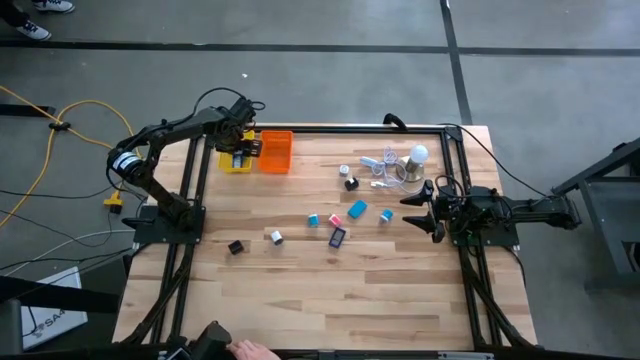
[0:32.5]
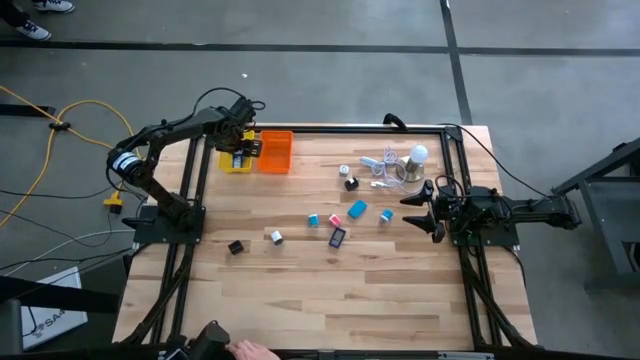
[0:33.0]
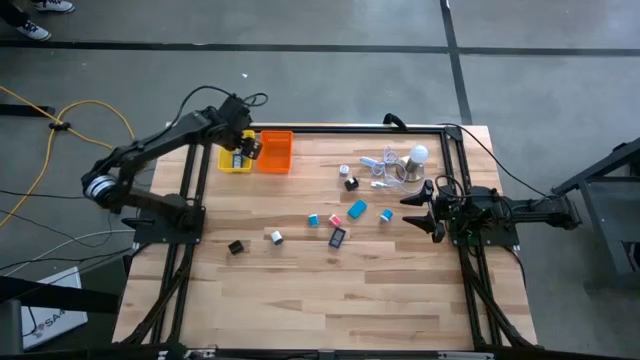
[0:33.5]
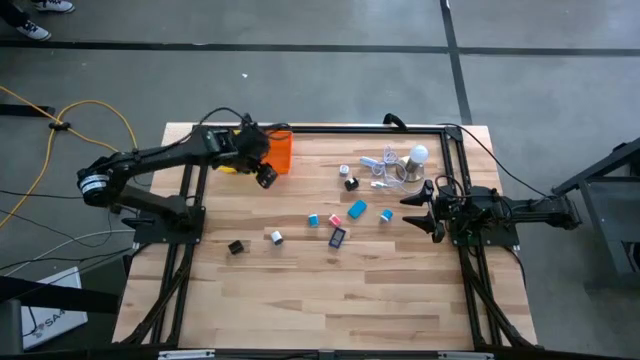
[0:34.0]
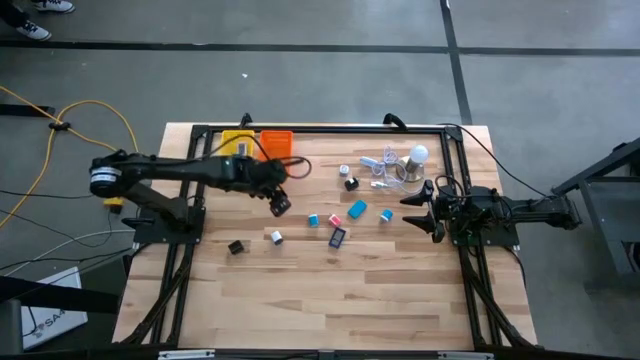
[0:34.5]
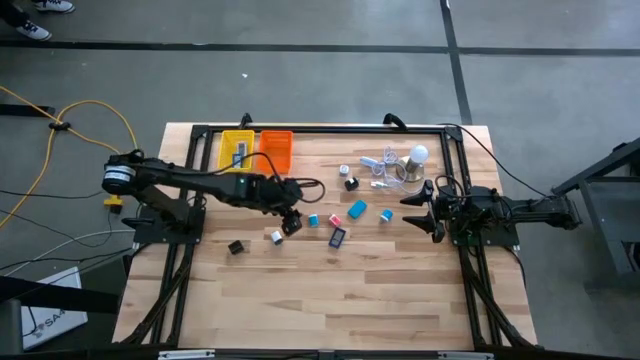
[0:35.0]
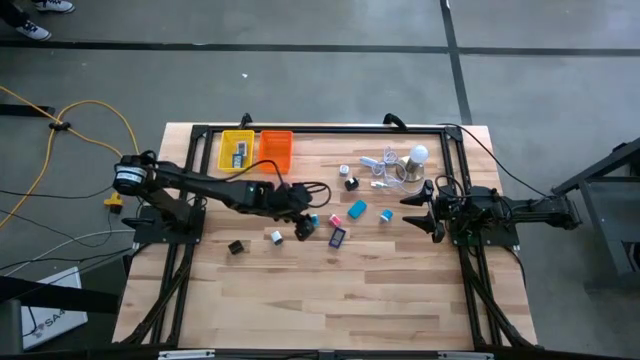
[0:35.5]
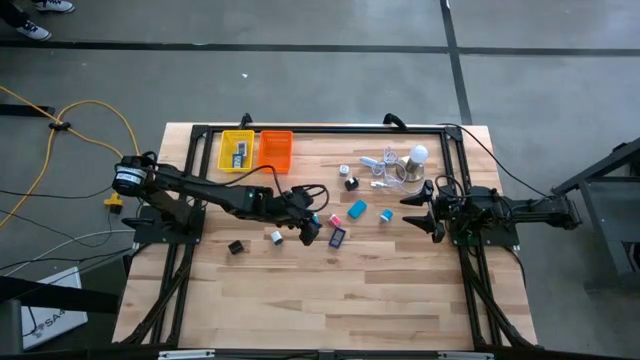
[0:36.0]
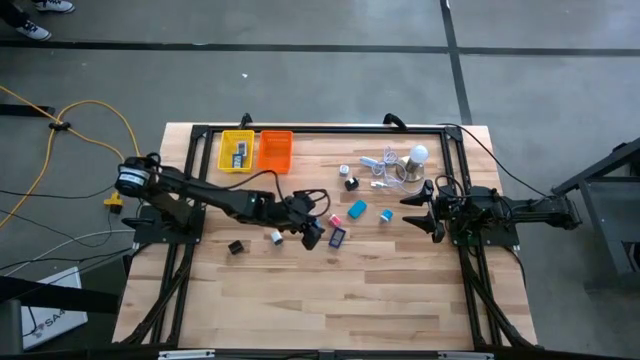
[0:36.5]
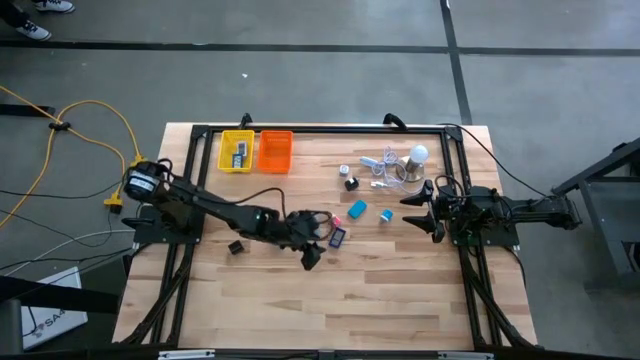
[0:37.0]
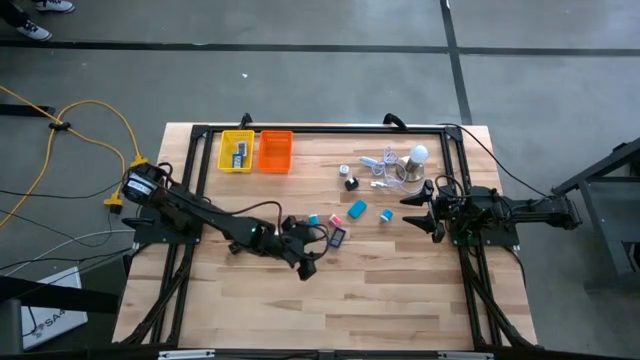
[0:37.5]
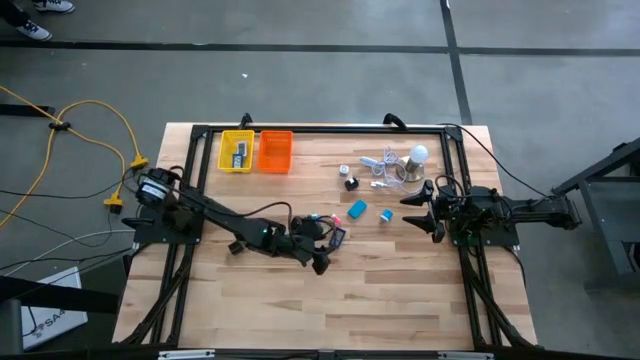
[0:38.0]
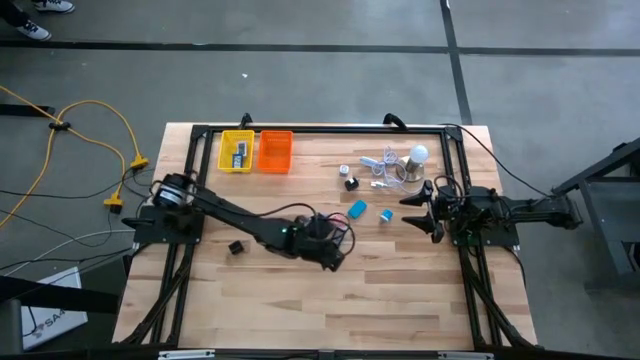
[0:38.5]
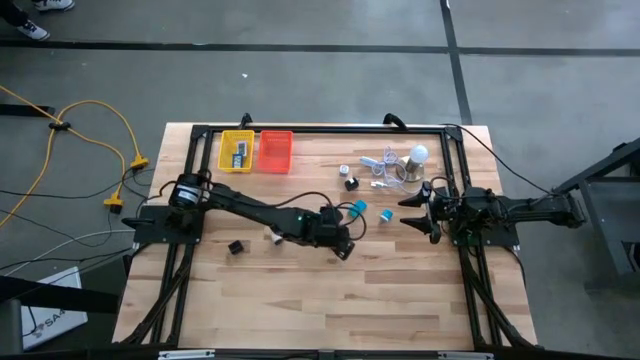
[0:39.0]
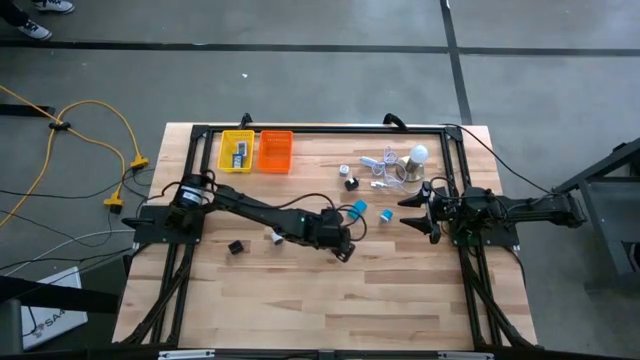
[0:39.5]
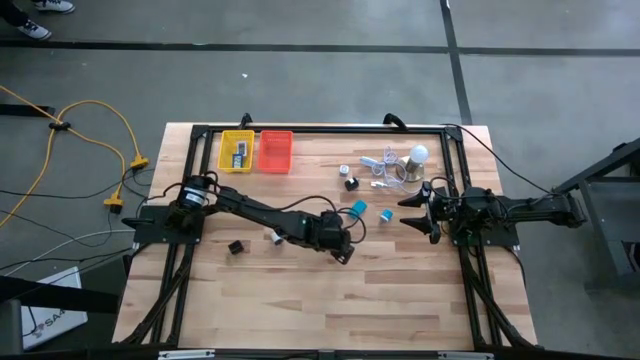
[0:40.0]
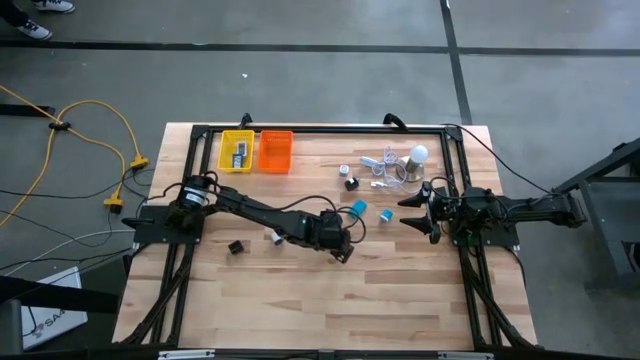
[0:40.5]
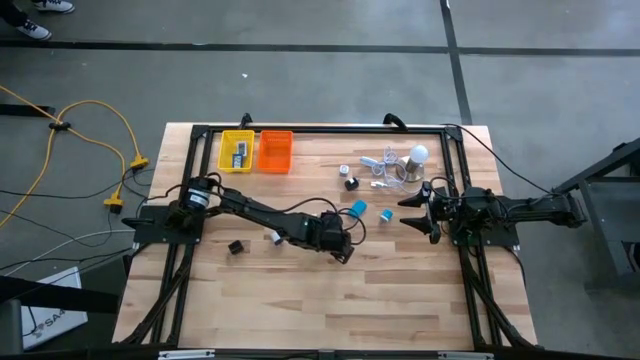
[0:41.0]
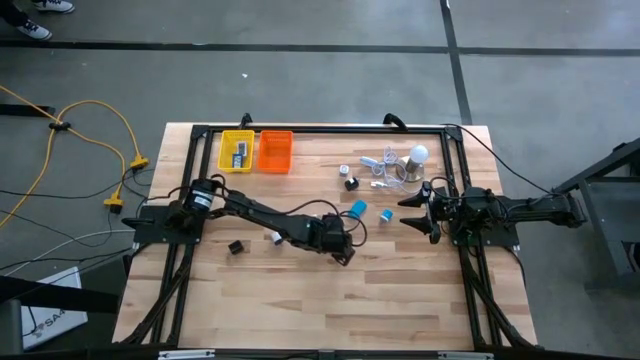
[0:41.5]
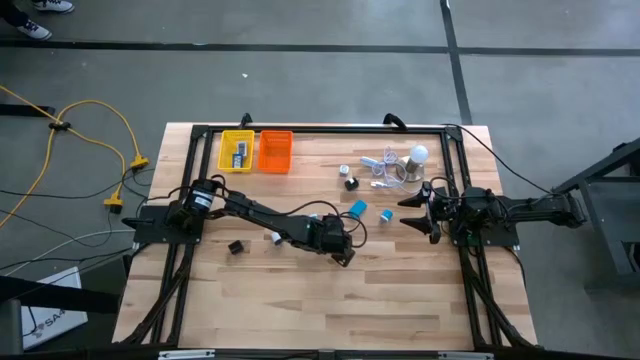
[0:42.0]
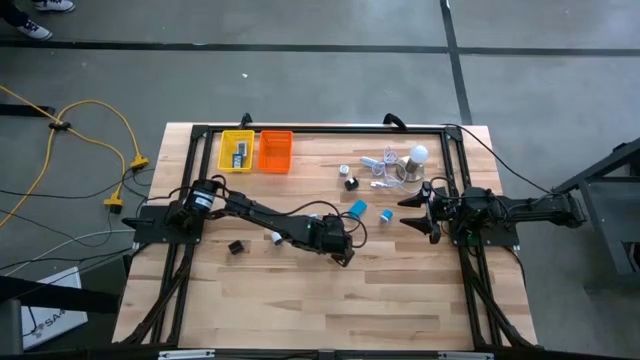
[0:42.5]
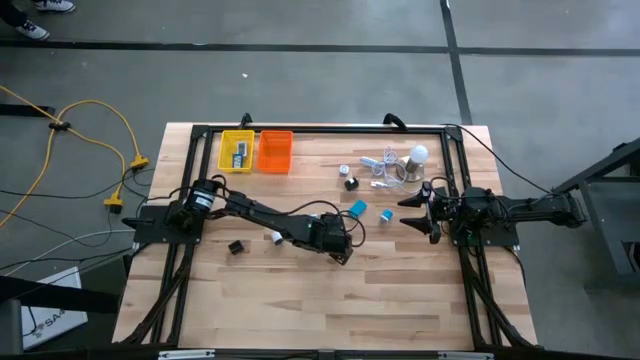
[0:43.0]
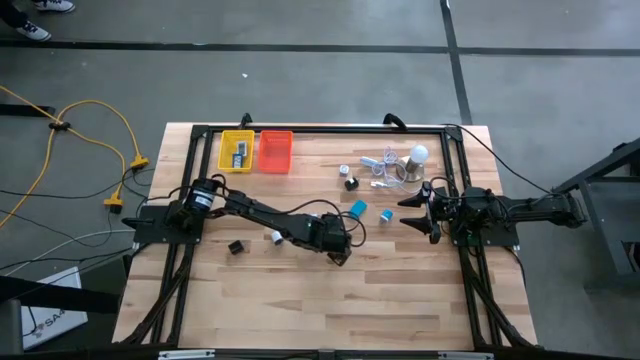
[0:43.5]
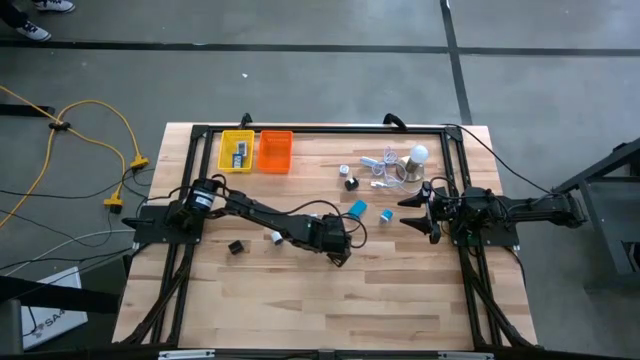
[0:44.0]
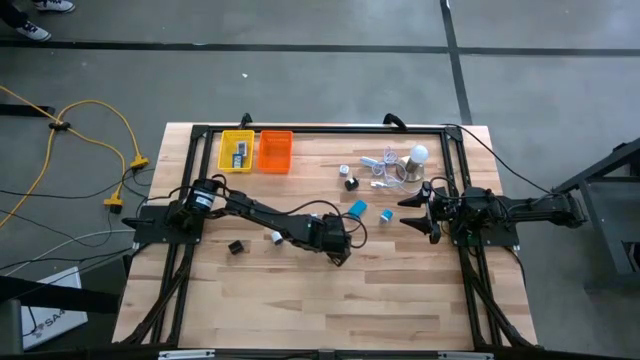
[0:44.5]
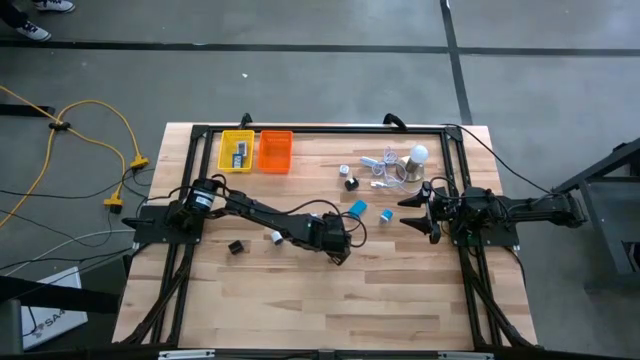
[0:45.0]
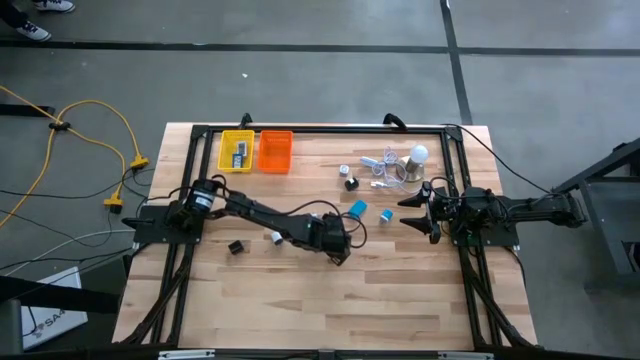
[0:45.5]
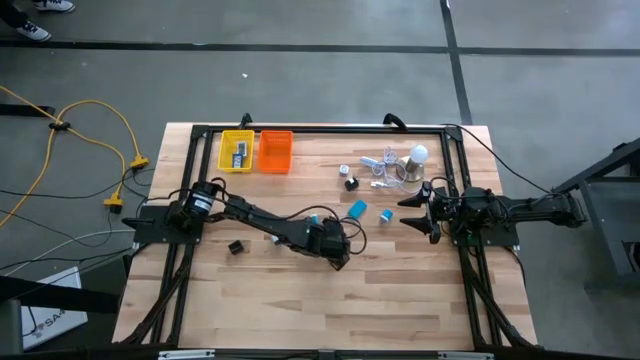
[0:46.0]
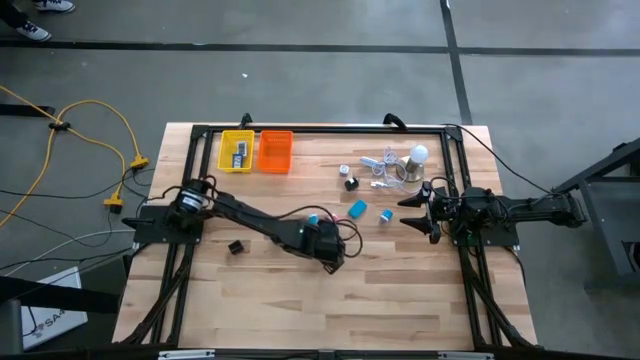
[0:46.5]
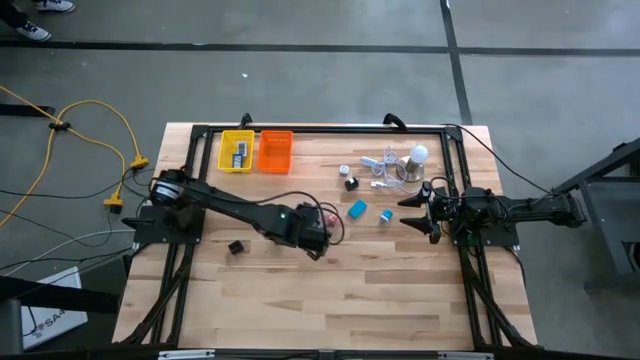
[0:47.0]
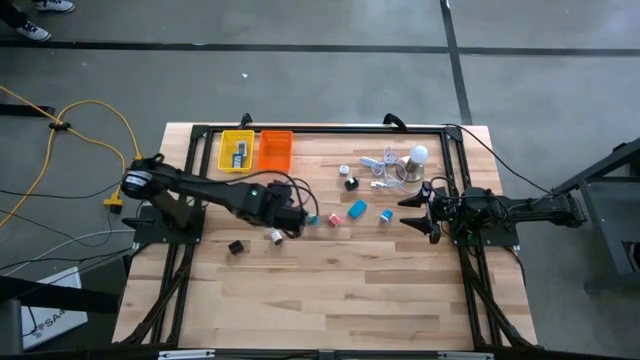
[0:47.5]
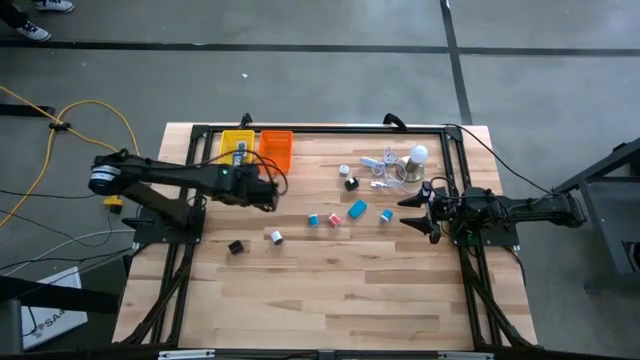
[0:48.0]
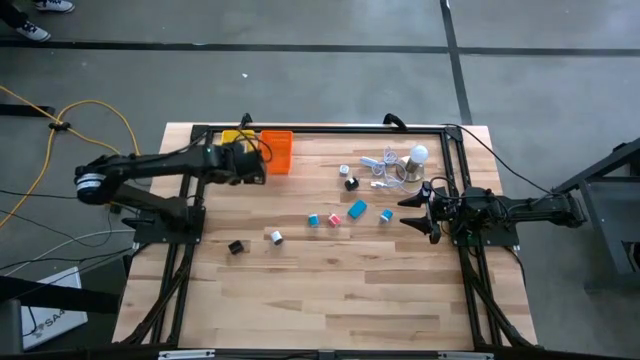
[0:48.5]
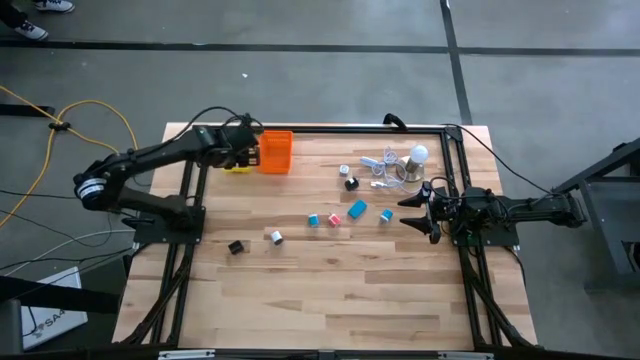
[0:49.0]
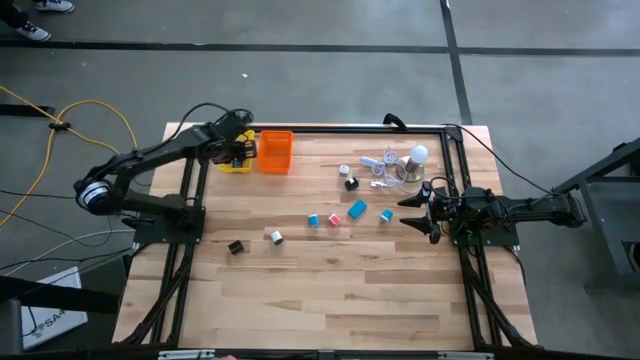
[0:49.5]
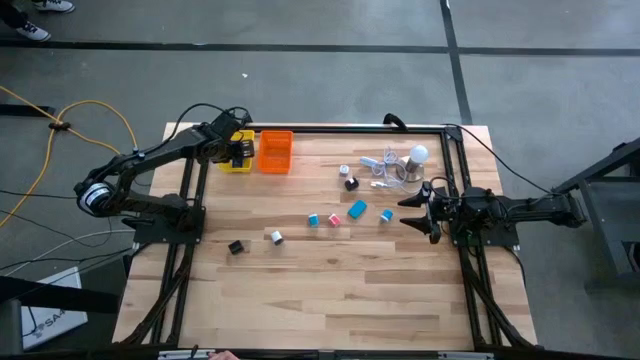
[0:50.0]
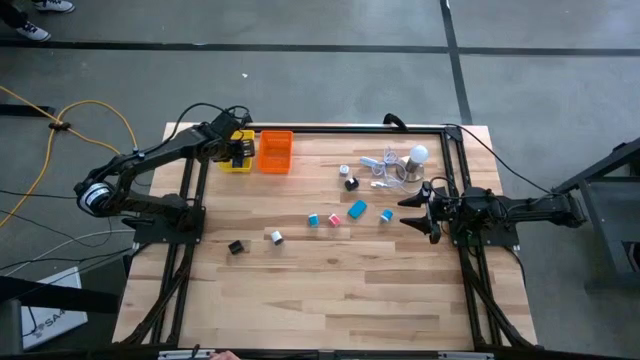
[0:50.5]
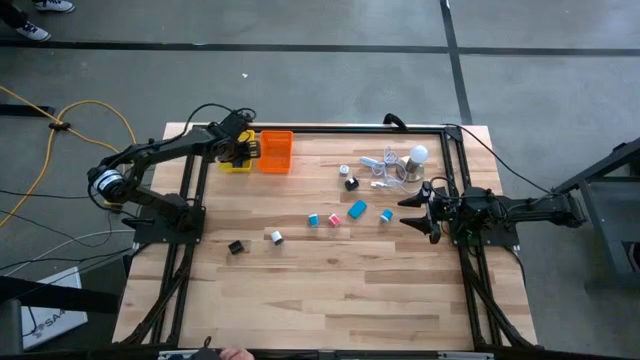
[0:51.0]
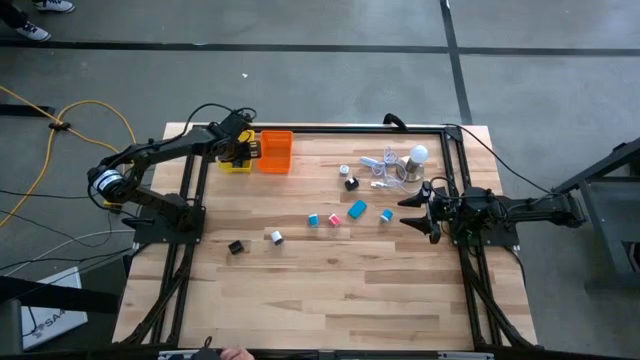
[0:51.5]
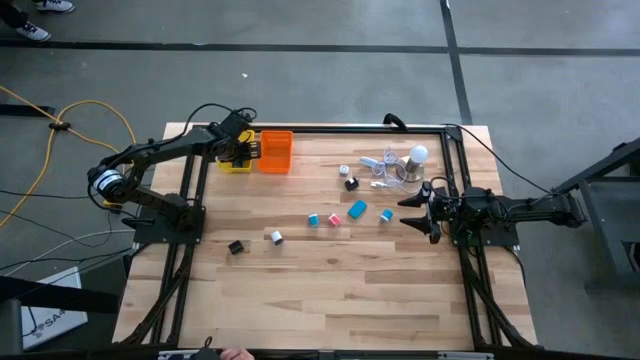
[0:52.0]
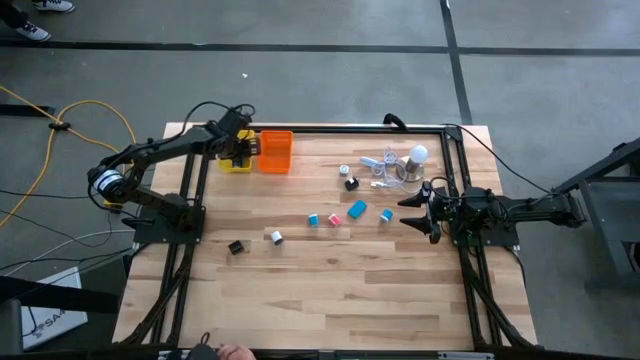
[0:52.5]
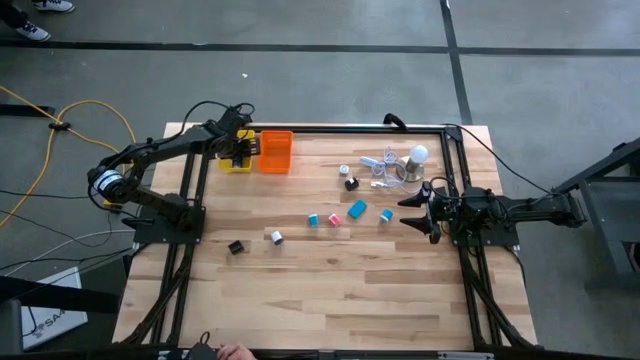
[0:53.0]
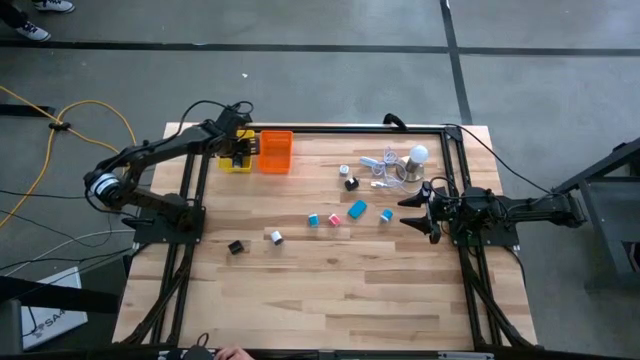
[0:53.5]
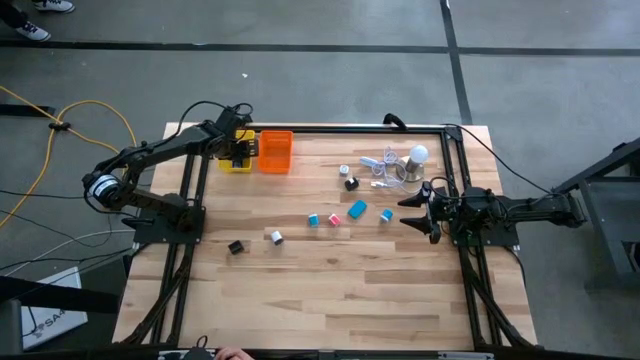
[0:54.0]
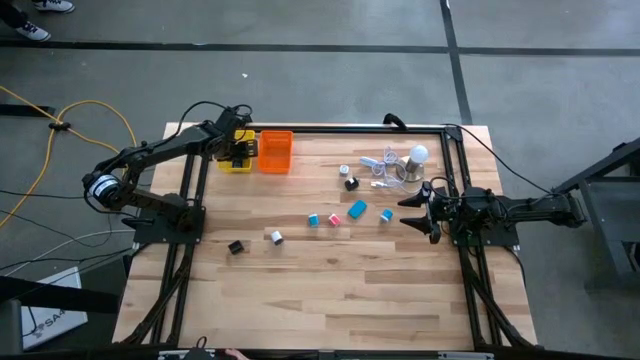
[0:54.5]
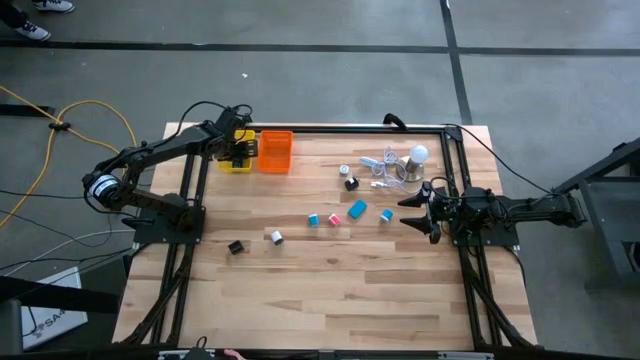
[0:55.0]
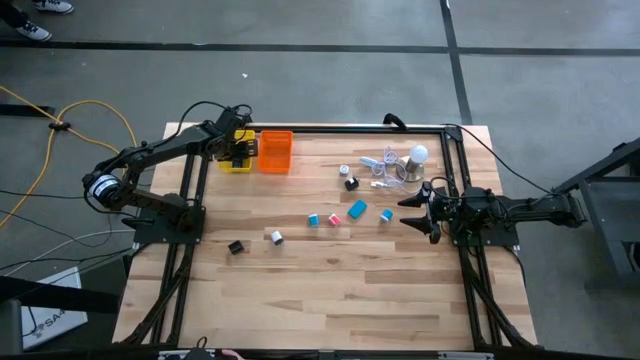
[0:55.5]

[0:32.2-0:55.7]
Task: Pick & Place Office items
Put the dark blue digital clock into the yellow basket
